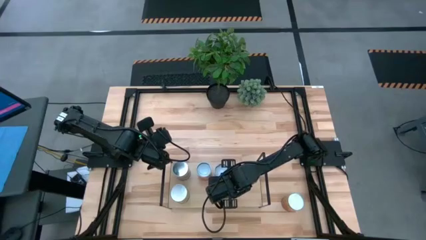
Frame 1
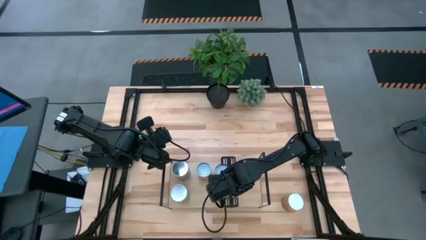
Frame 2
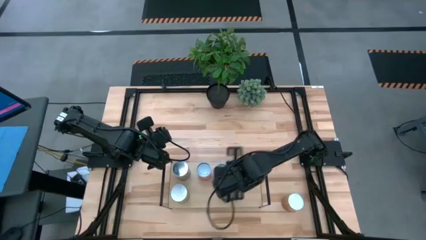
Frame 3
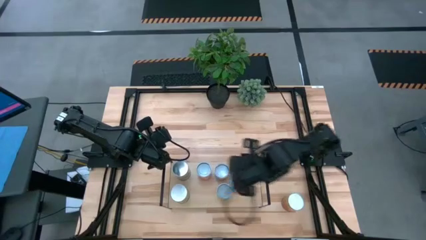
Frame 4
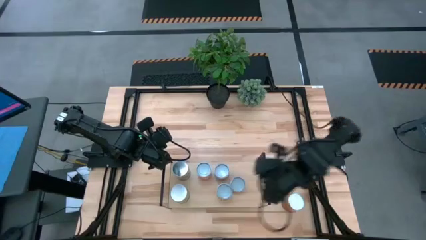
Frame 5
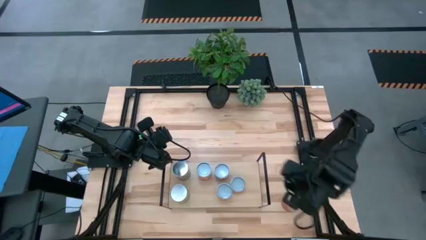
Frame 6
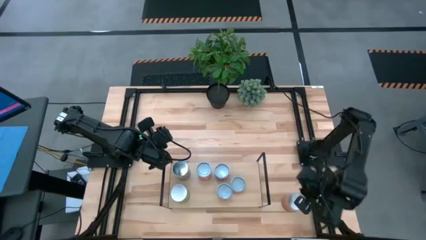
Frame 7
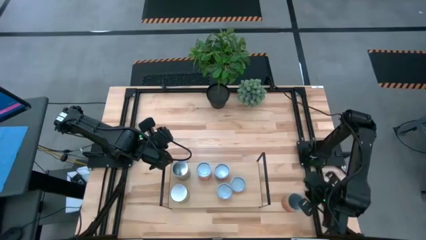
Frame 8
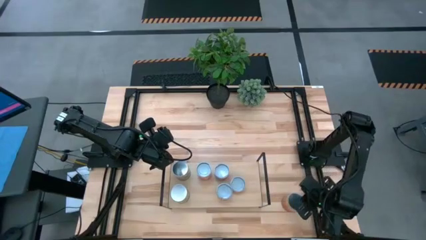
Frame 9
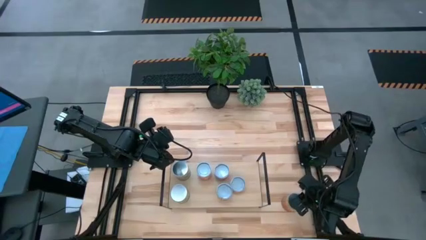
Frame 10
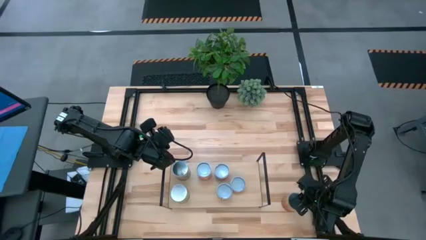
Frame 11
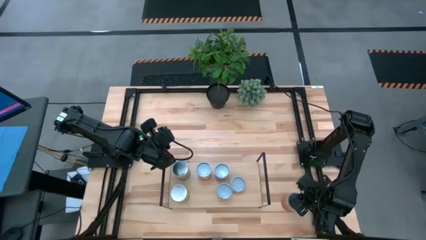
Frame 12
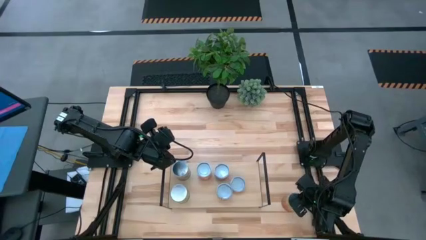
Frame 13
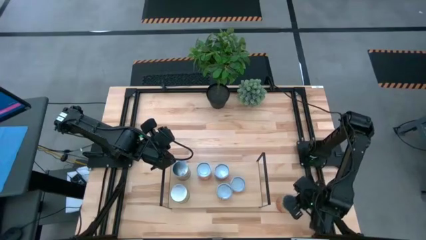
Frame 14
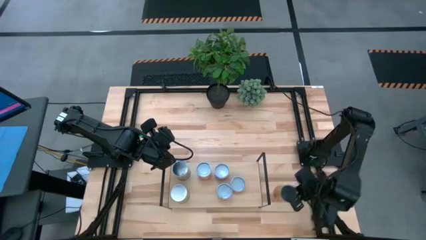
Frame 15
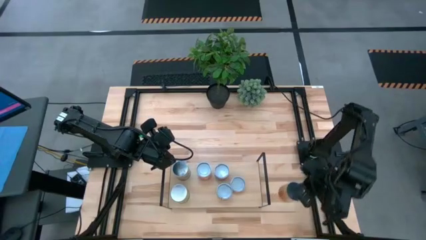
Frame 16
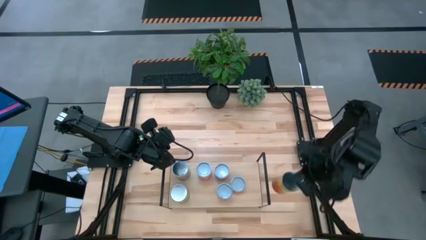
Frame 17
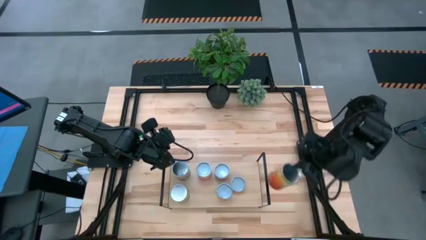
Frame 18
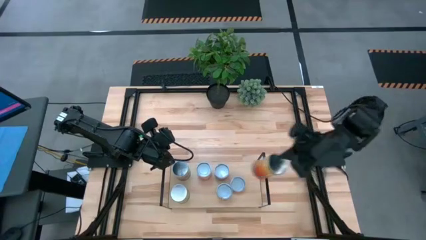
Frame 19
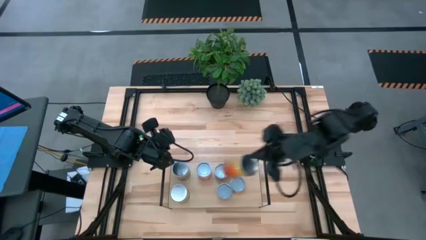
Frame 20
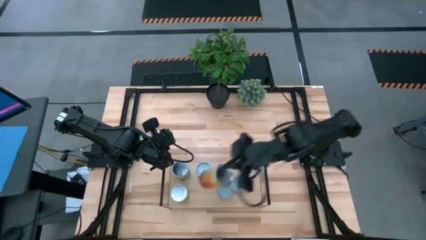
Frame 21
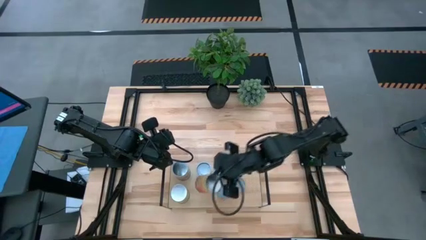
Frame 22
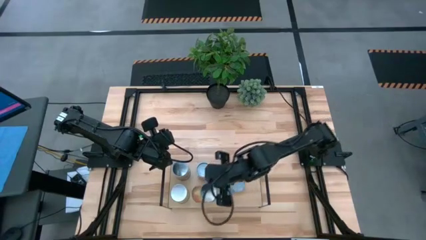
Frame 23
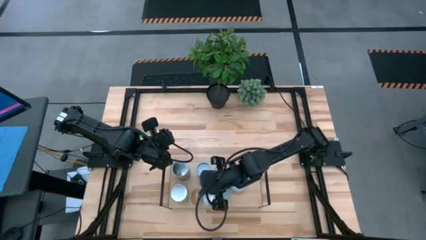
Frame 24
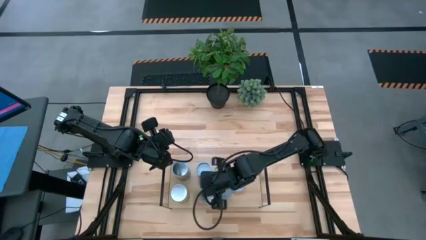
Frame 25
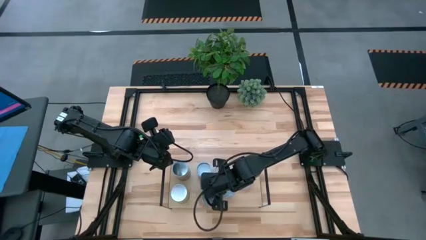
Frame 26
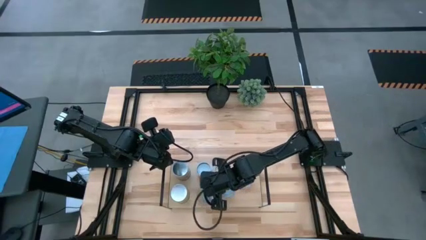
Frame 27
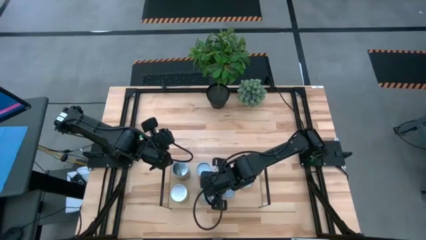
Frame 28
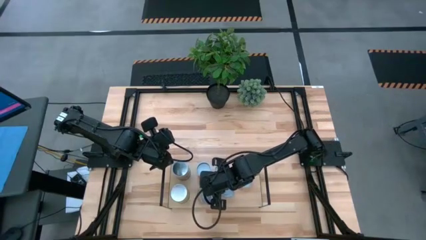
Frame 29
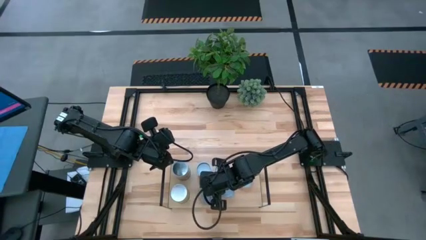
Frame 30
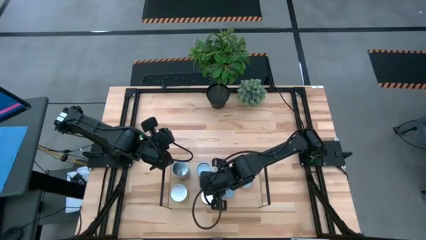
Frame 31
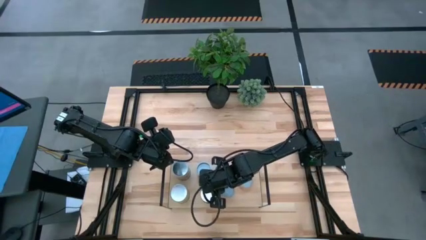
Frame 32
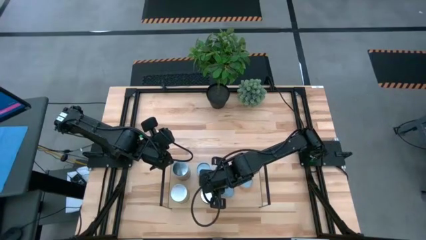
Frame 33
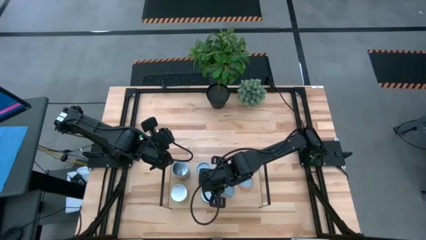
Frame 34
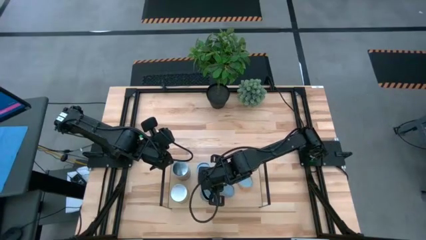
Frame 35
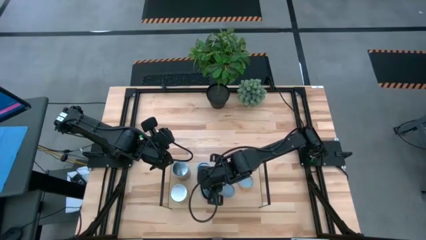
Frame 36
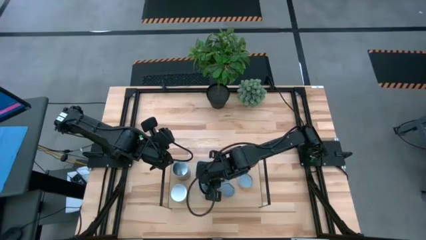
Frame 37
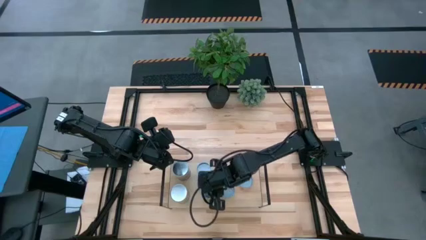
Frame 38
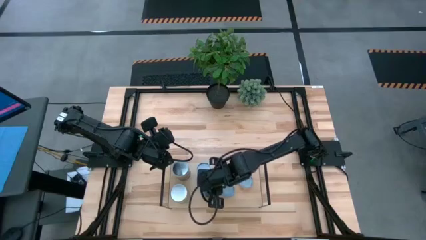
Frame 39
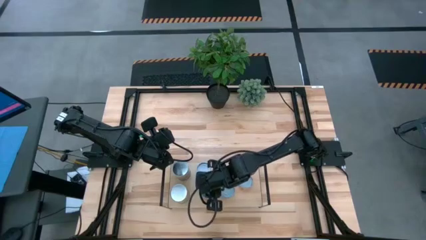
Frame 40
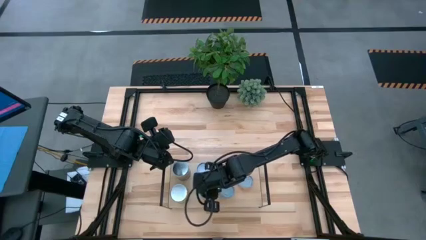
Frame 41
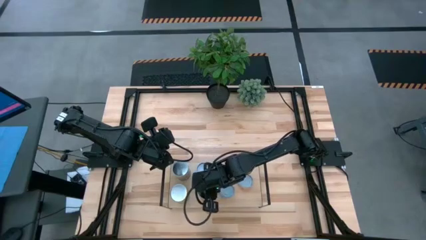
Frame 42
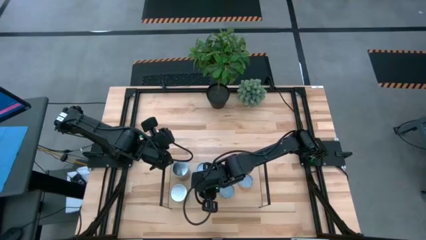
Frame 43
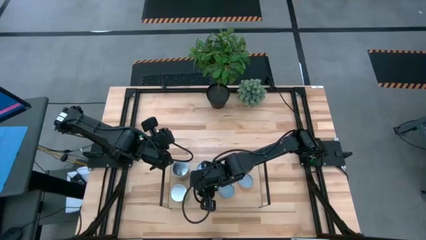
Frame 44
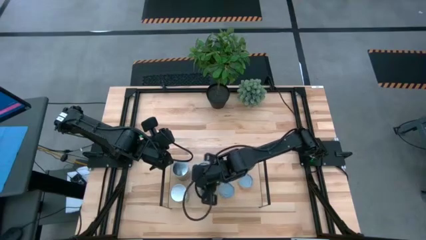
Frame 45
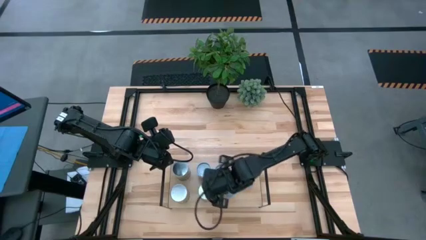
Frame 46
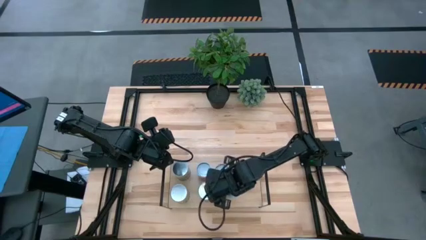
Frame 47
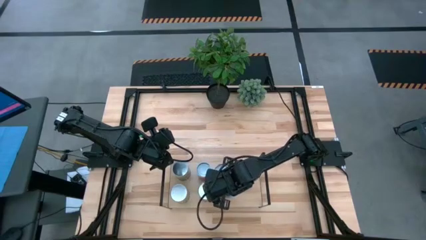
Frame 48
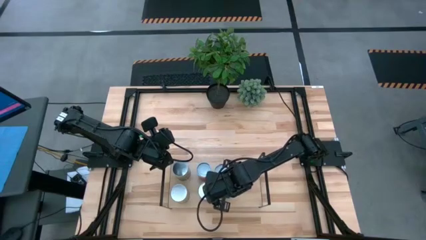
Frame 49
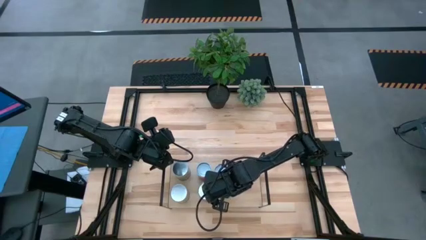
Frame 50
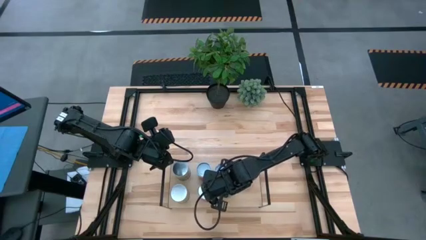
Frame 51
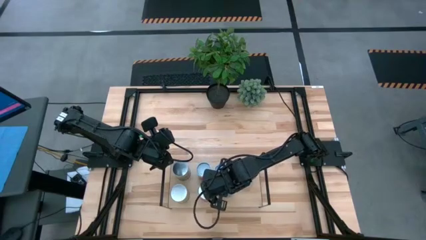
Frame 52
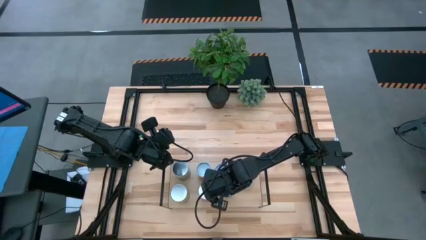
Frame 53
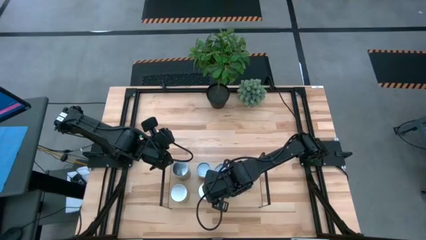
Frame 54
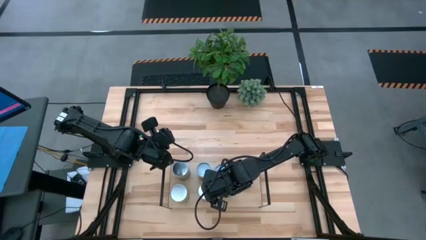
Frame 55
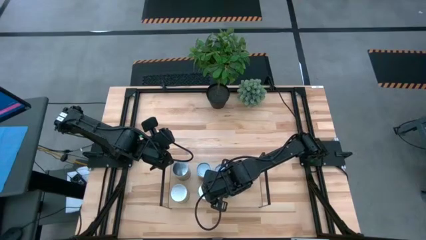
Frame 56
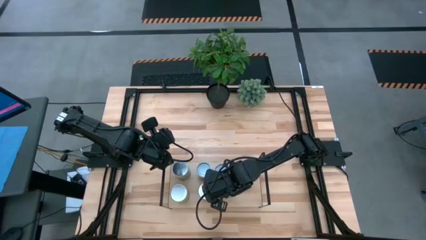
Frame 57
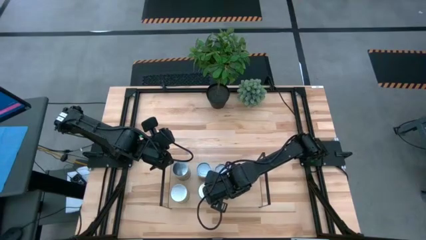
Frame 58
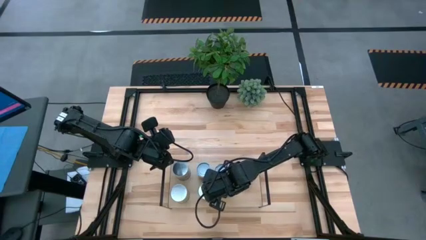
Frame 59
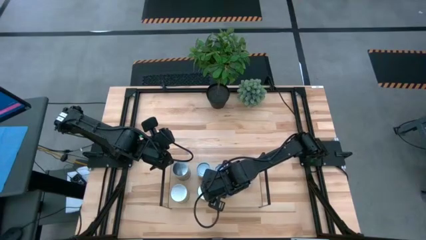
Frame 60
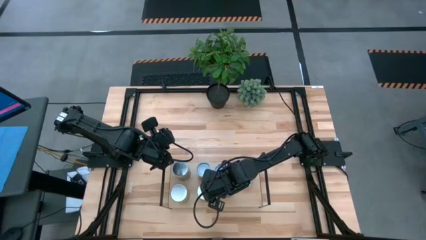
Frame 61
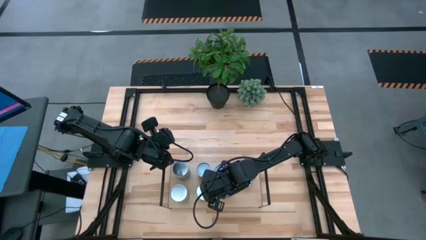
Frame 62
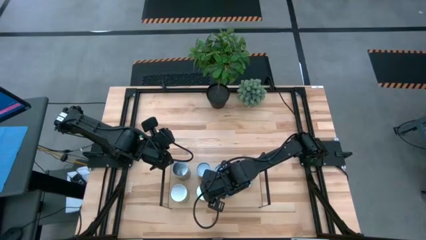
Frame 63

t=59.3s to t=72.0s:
Task: Pick and place cans onto a shelf
Put the orange bean can on the shelf aligned with the orange mix fruit can
